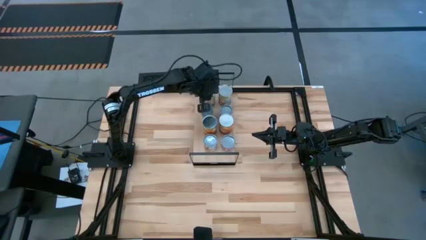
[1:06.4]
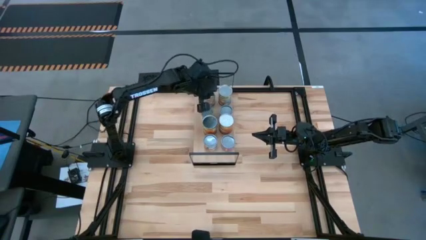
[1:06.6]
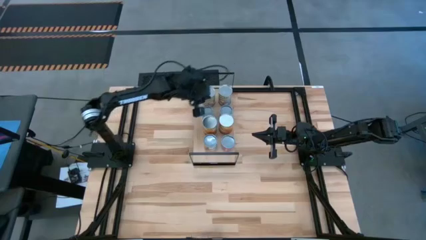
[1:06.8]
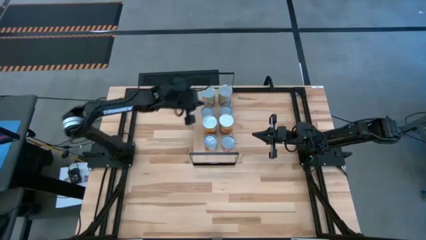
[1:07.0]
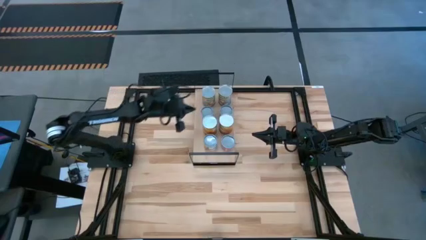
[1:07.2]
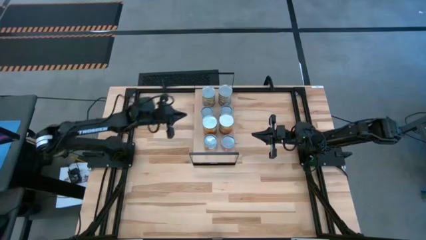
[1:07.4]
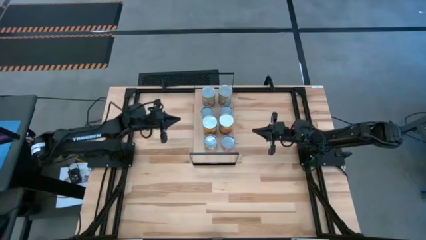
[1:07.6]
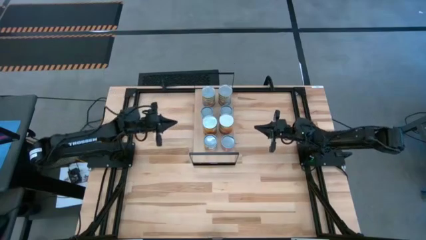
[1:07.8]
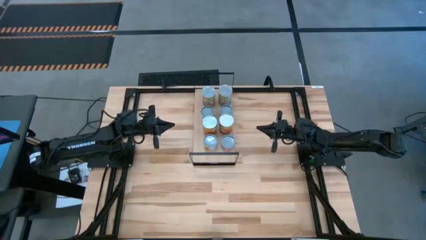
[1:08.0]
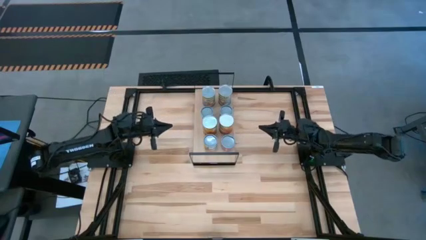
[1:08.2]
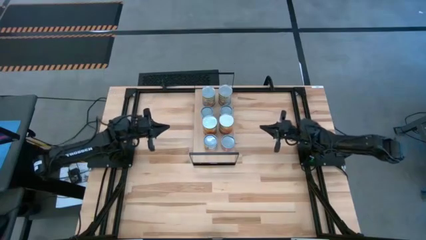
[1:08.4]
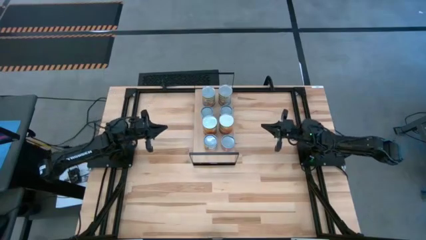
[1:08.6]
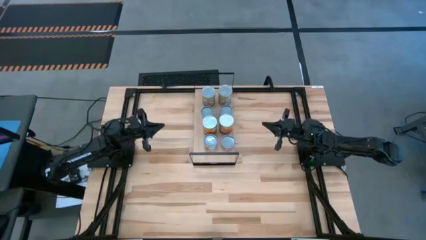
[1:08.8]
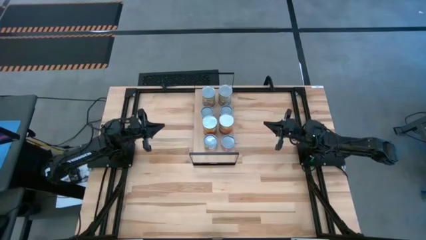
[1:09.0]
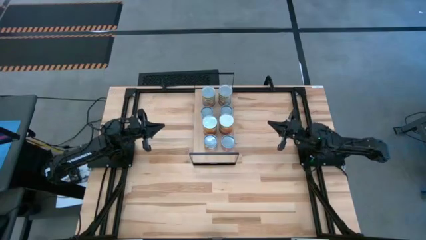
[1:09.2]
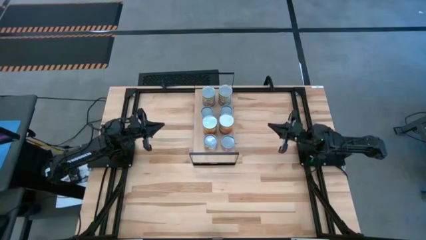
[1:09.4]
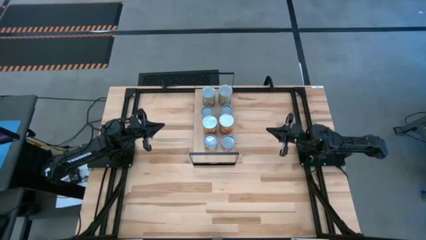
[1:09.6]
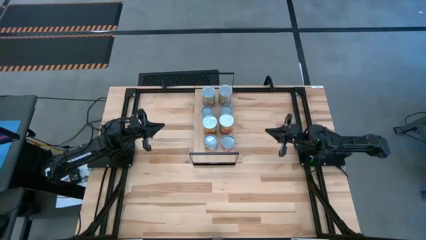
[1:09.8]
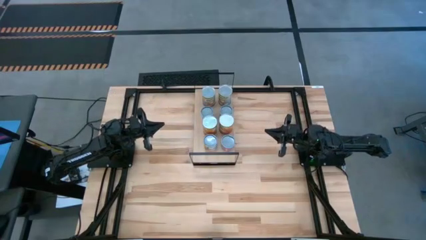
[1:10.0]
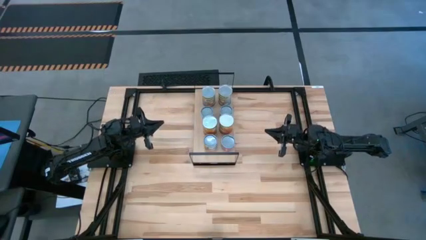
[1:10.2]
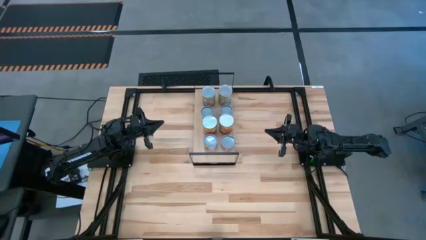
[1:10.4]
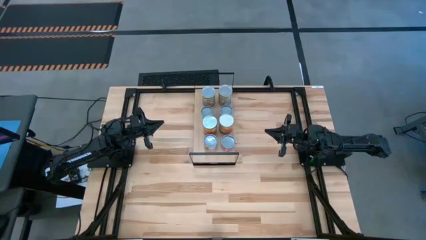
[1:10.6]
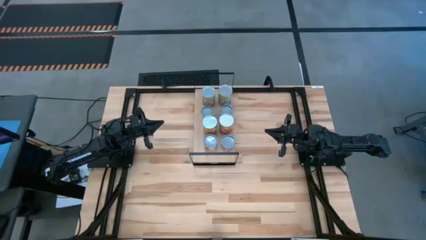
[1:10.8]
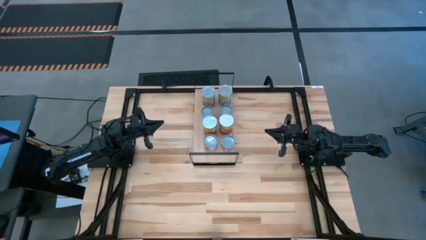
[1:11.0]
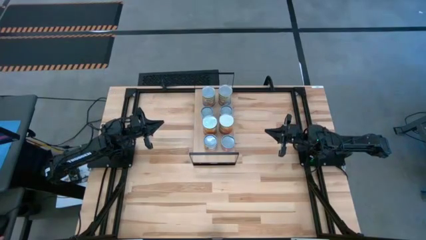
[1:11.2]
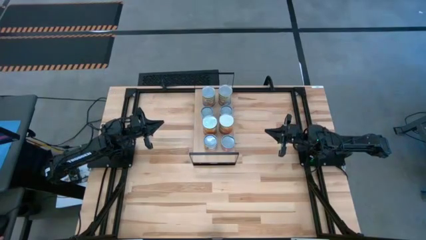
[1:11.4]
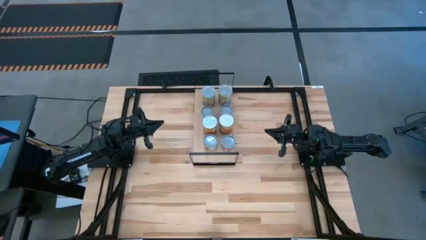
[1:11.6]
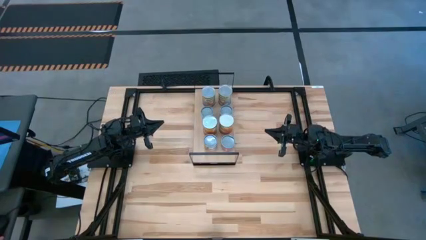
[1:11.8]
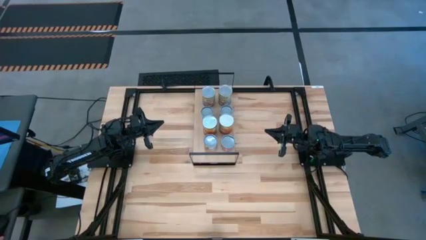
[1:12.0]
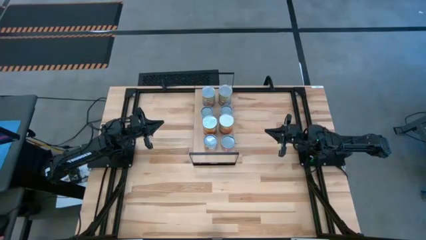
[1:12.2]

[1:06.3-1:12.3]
Task: Pick and place cans onto a shelf
Return to Home Position

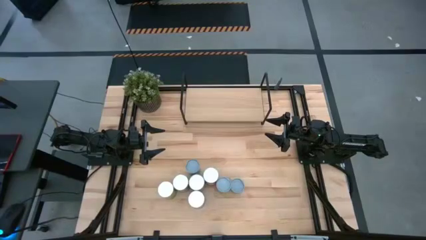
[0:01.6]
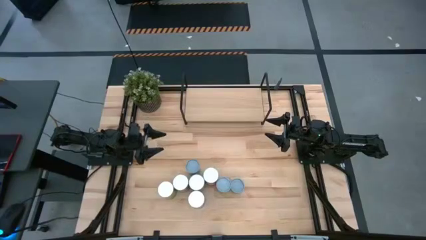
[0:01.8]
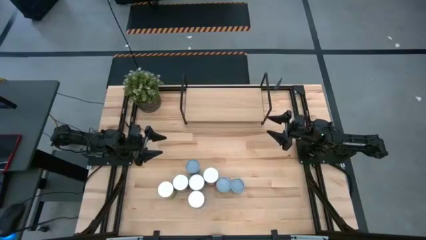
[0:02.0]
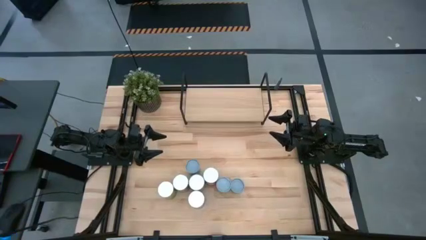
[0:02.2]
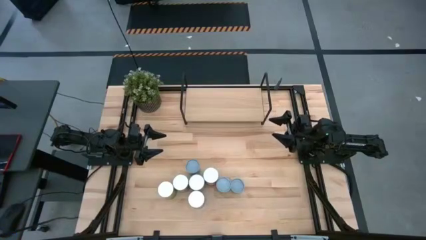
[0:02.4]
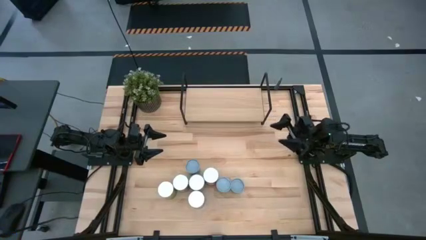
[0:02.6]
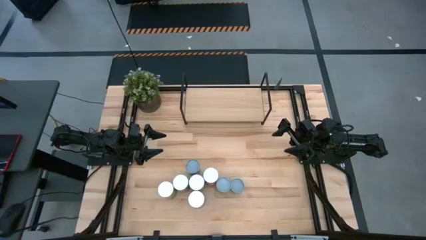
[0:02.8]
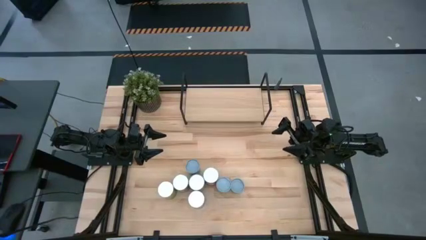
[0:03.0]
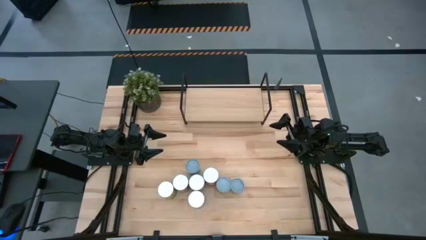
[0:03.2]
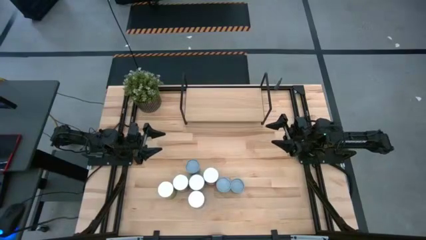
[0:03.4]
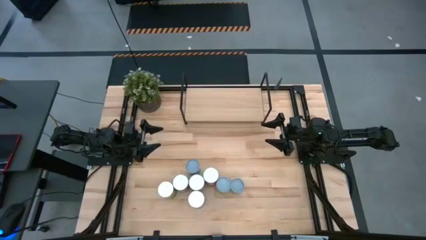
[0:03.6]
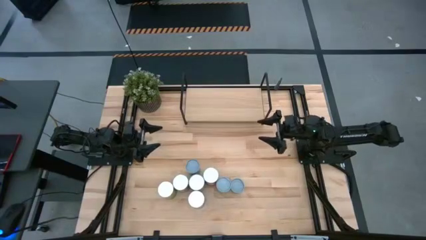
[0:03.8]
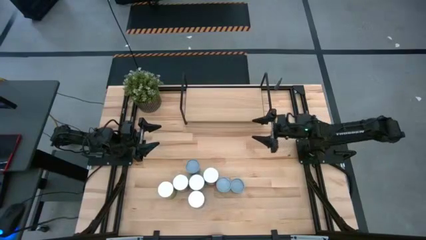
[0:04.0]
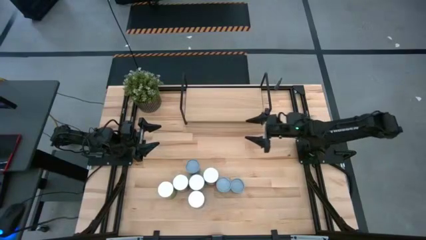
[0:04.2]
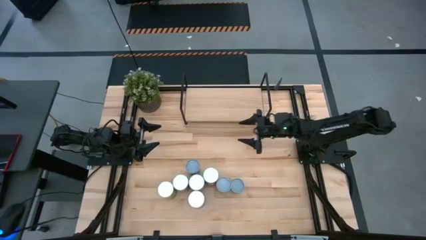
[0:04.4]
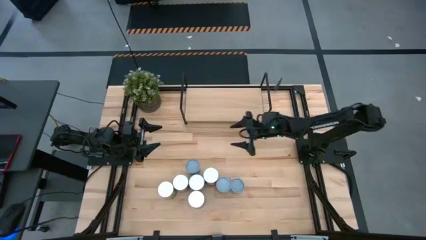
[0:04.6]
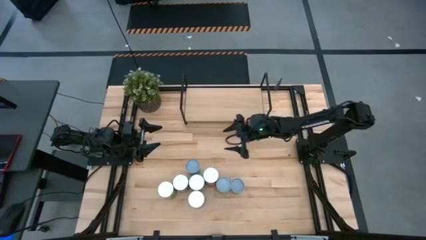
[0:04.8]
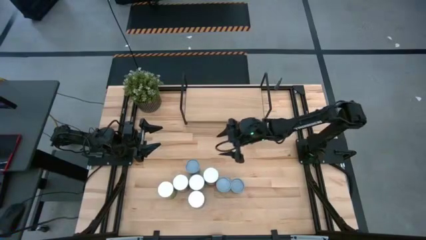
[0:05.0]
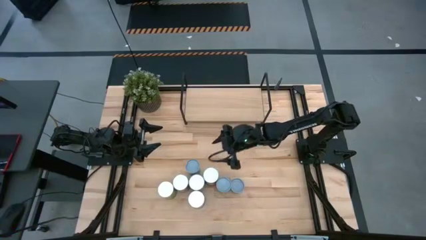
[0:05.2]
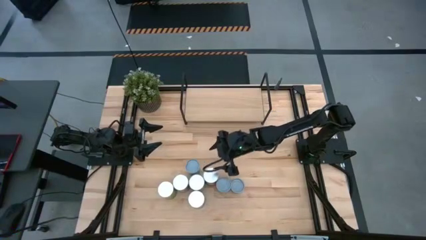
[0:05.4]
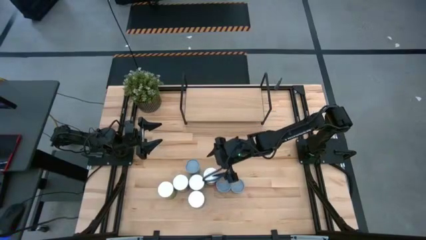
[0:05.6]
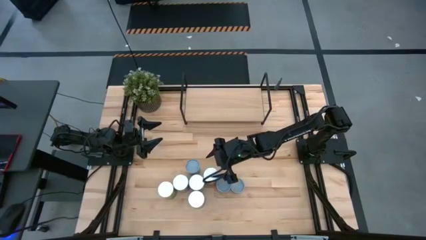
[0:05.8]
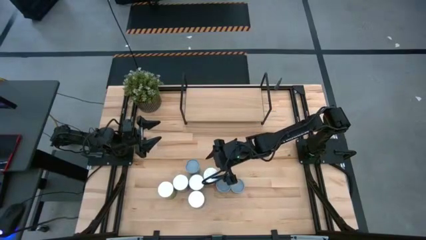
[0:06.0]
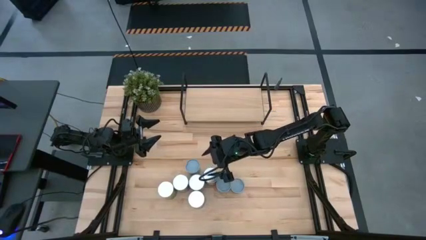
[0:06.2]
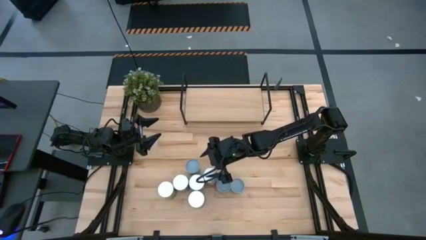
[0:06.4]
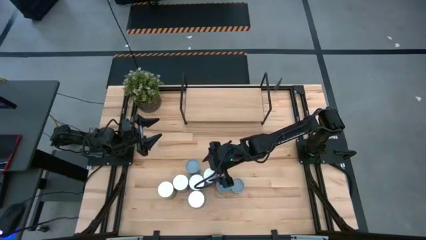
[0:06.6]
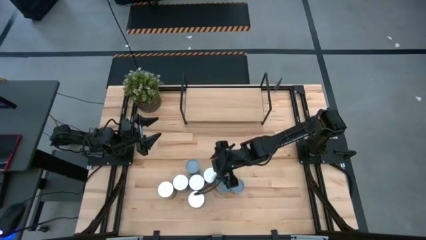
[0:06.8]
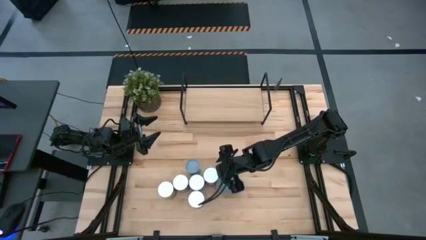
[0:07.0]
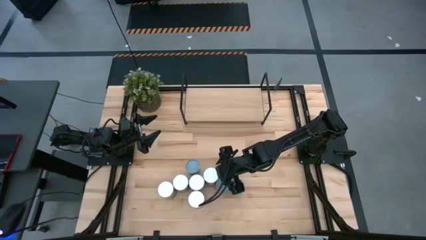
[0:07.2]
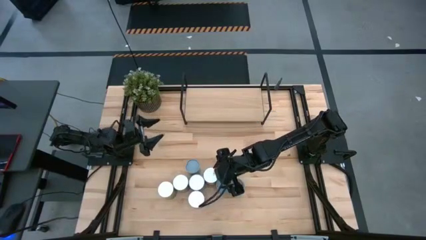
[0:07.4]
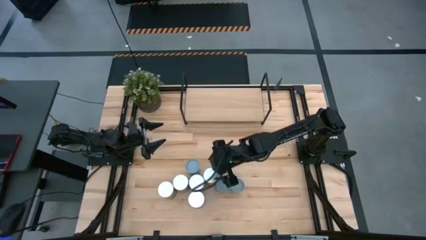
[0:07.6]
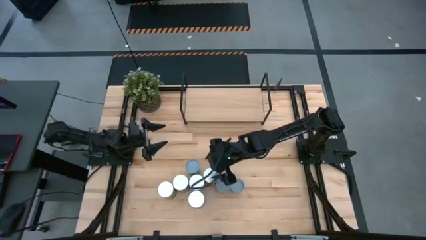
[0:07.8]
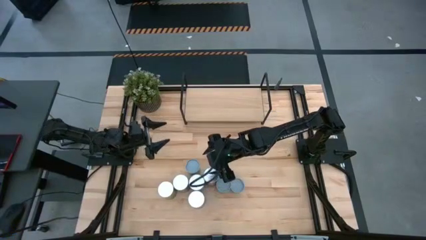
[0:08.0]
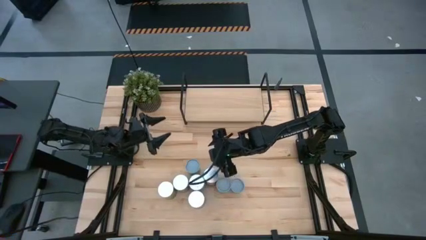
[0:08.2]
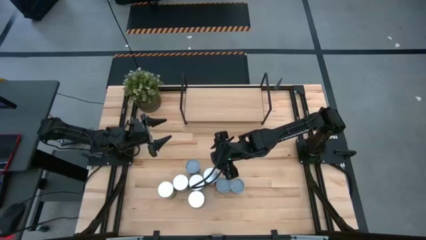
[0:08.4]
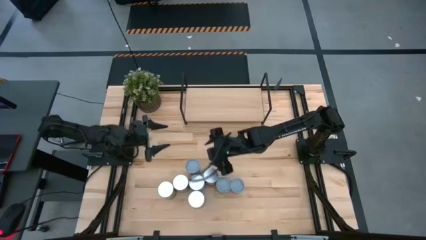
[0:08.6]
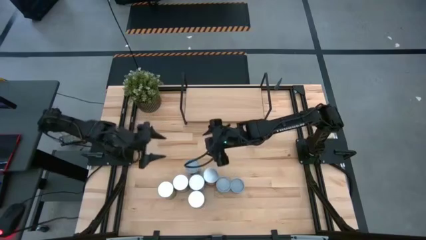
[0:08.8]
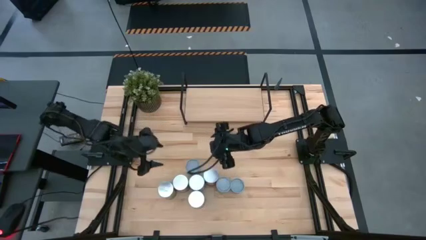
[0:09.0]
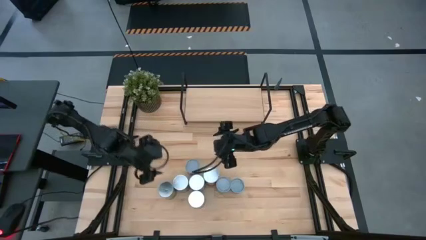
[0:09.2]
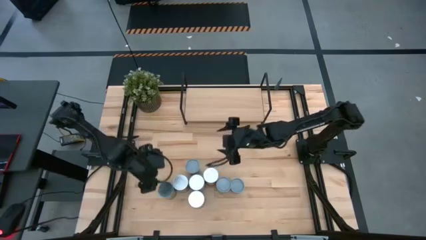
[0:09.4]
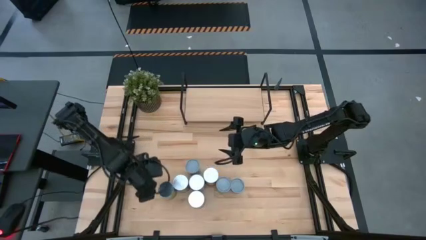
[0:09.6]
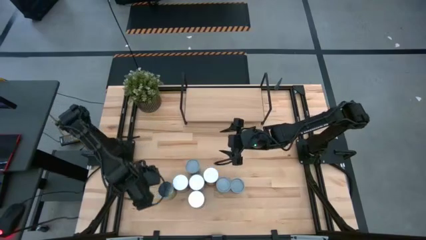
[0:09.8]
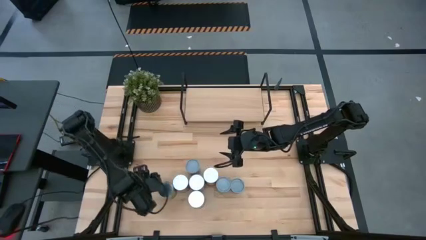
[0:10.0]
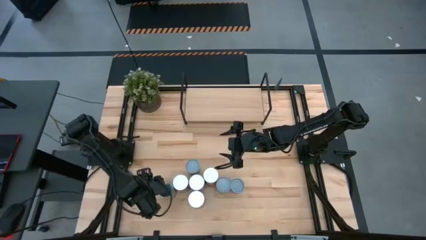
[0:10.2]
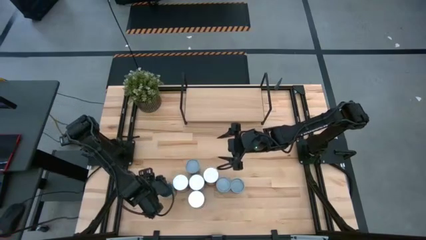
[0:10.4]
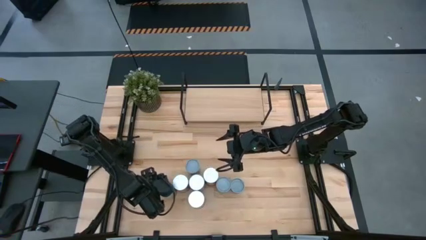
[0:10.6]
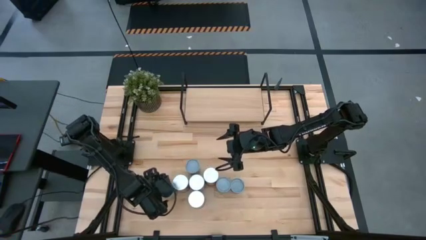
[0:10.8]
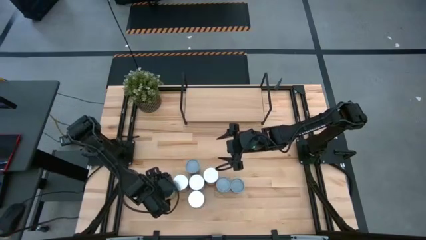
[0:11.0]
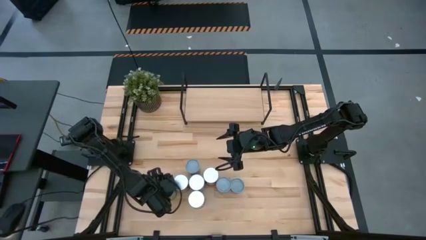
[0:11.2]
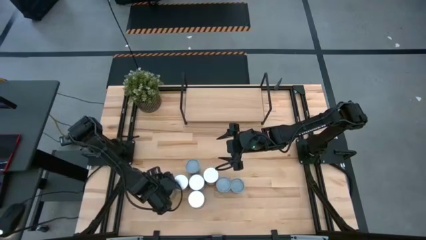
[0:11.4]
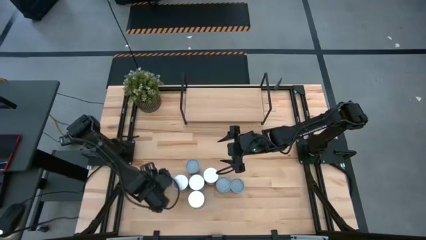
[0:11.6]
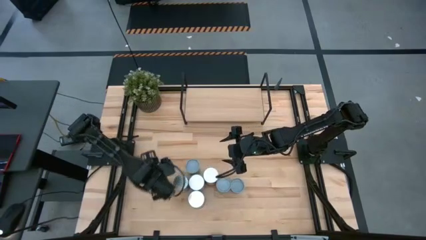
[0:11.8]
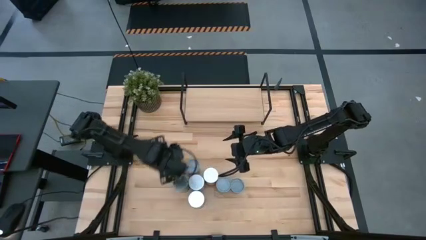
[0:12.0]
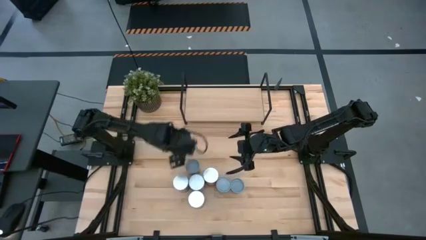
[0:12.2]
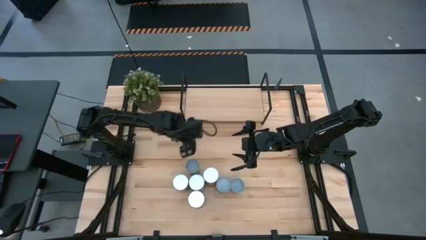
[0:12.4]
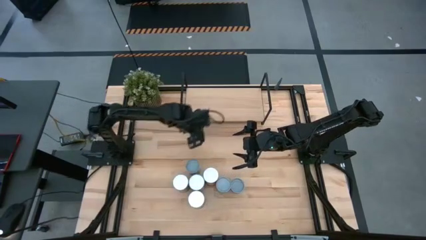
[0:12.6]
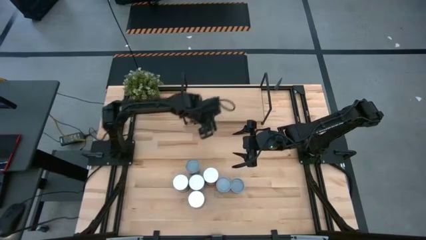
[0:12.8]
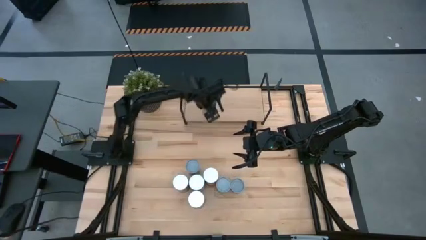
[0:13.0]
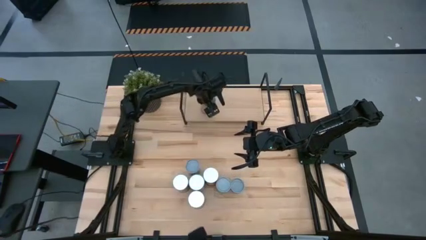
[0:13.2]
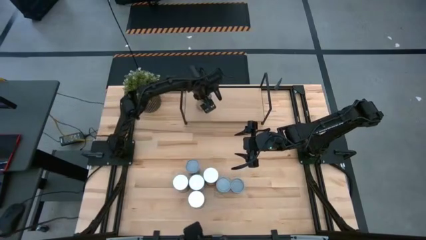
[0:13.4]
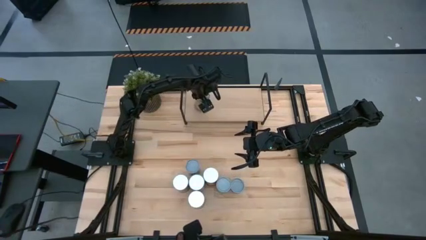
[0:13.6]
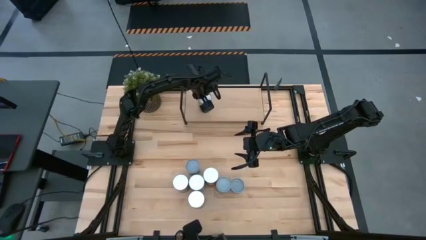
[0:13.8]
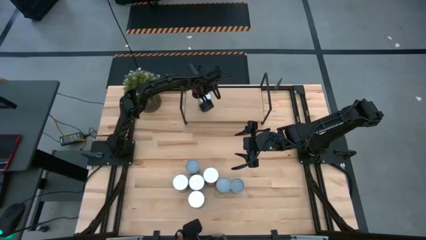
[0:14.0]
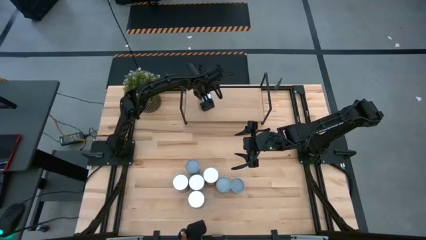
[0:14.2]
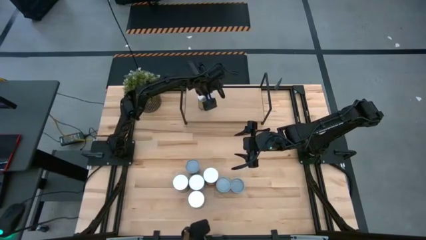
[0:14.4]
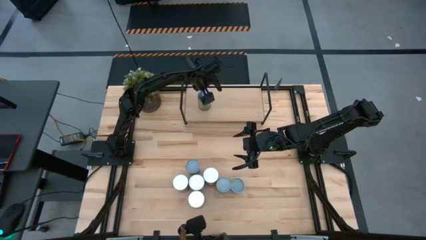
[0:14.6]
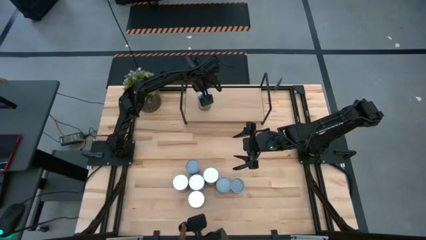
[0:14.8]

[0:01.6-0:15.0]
Task: Pick and place cans onto a shelf
Put the canned oranges on the shelf
